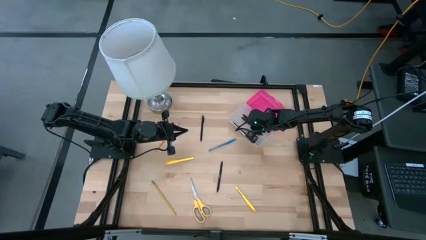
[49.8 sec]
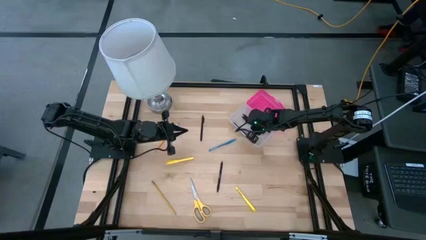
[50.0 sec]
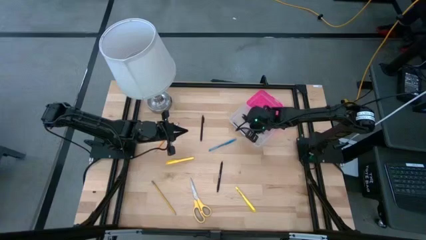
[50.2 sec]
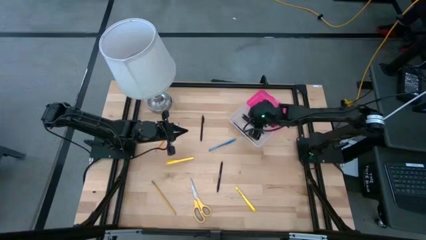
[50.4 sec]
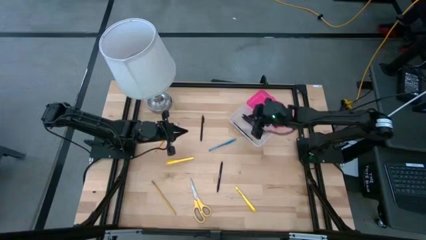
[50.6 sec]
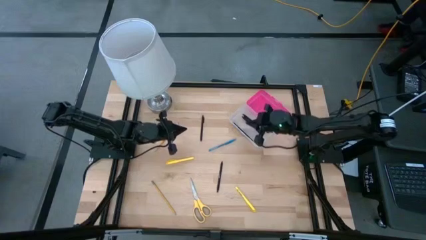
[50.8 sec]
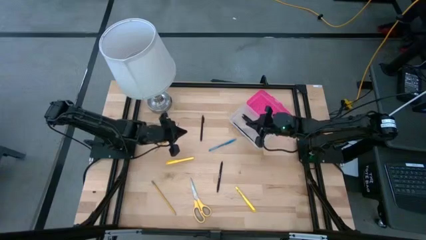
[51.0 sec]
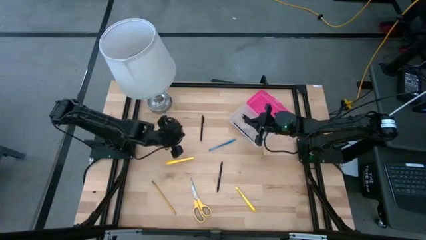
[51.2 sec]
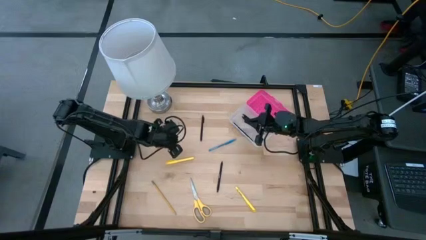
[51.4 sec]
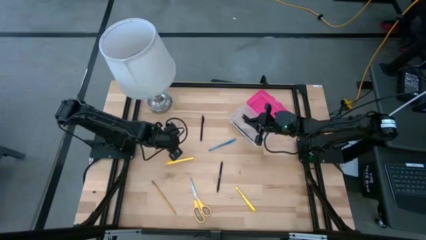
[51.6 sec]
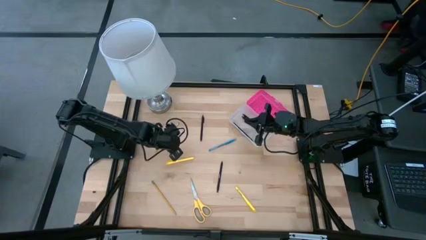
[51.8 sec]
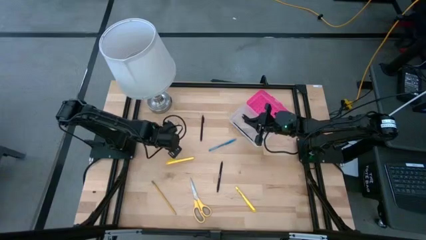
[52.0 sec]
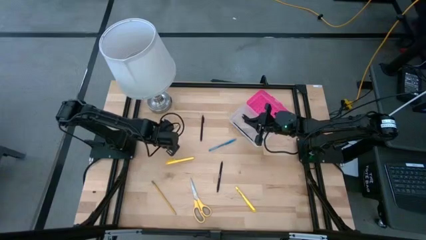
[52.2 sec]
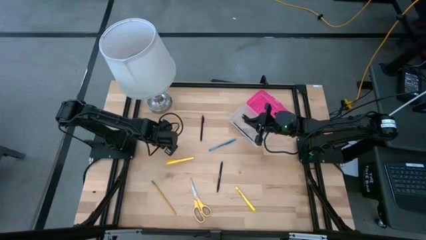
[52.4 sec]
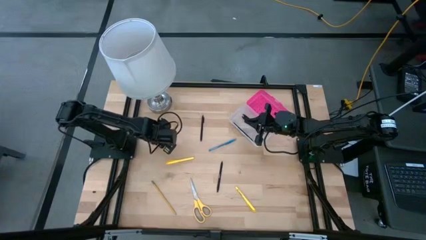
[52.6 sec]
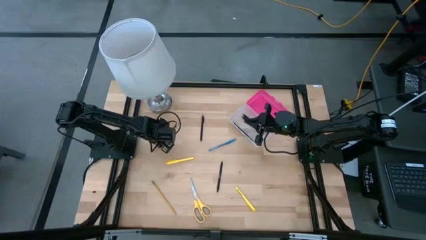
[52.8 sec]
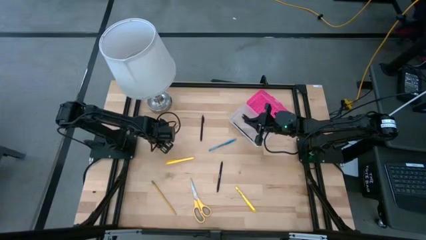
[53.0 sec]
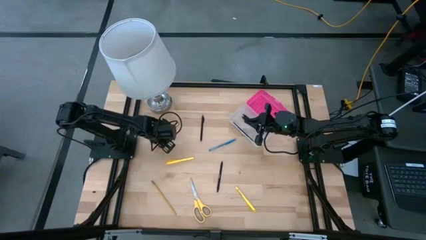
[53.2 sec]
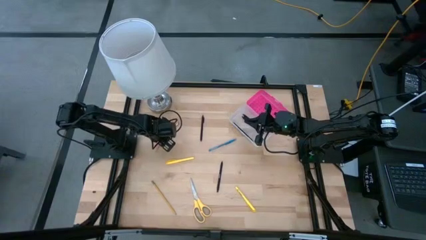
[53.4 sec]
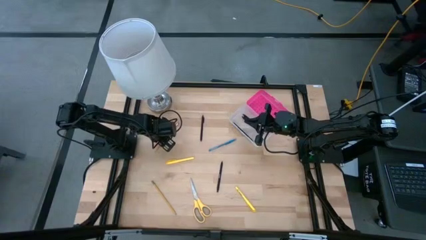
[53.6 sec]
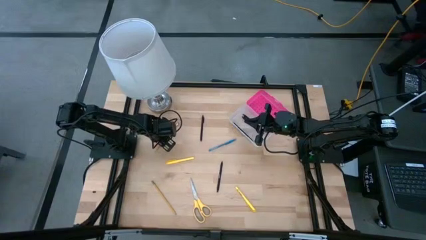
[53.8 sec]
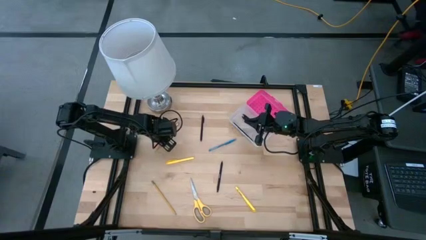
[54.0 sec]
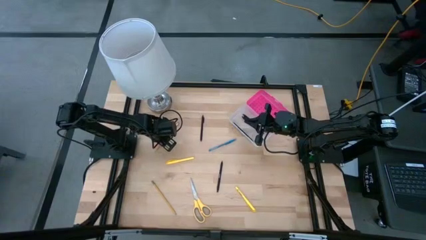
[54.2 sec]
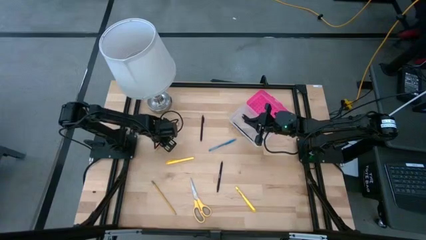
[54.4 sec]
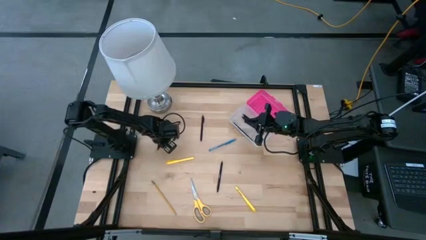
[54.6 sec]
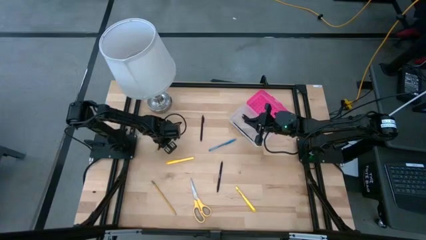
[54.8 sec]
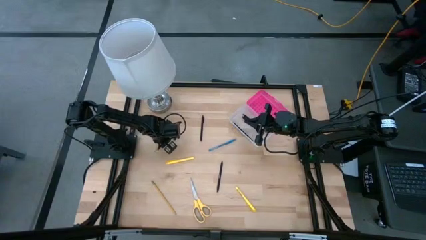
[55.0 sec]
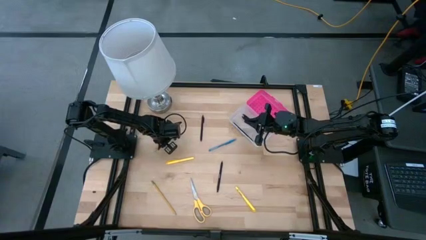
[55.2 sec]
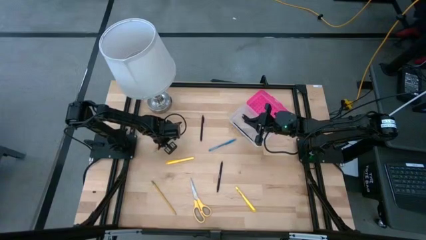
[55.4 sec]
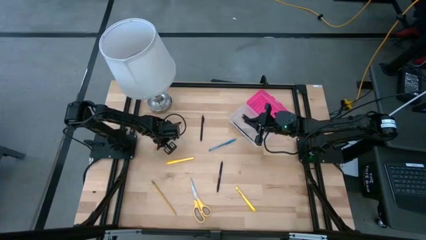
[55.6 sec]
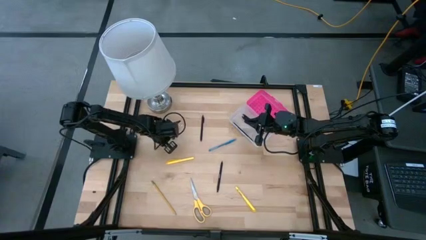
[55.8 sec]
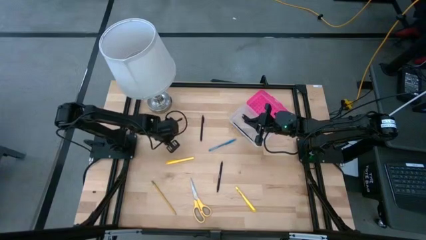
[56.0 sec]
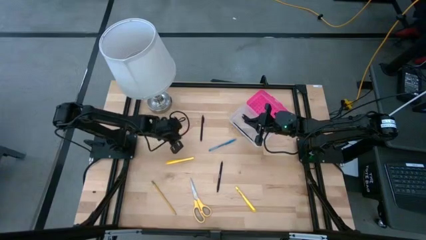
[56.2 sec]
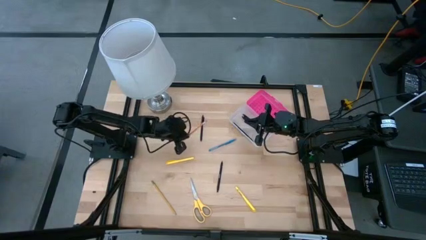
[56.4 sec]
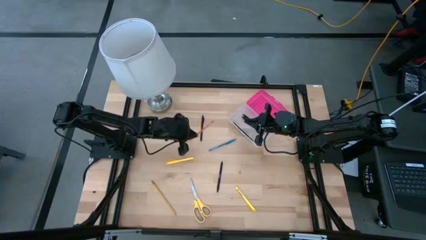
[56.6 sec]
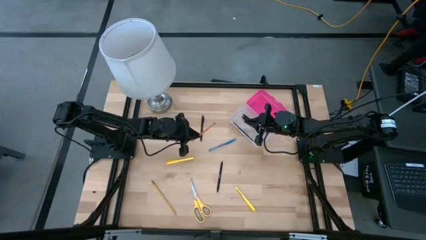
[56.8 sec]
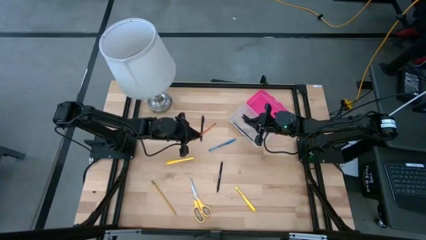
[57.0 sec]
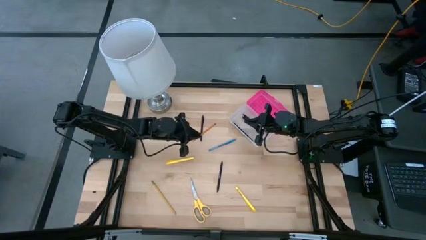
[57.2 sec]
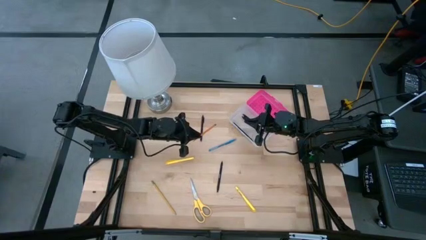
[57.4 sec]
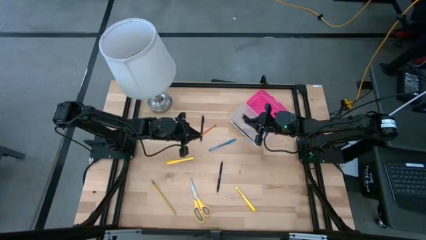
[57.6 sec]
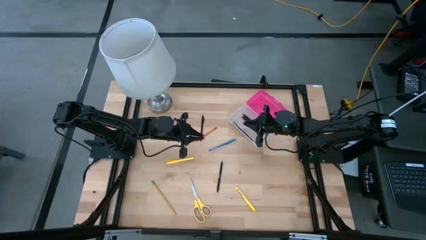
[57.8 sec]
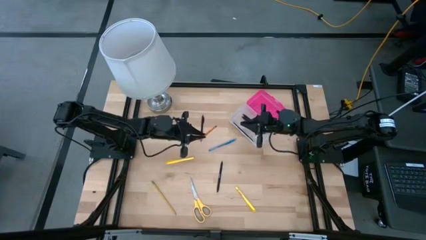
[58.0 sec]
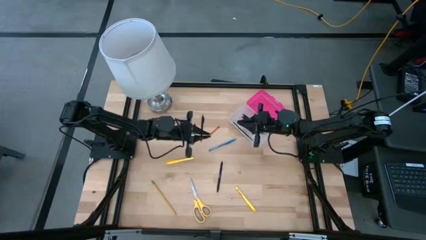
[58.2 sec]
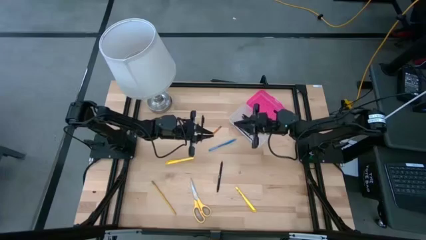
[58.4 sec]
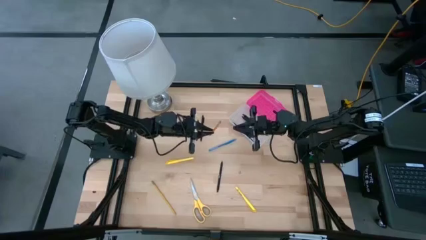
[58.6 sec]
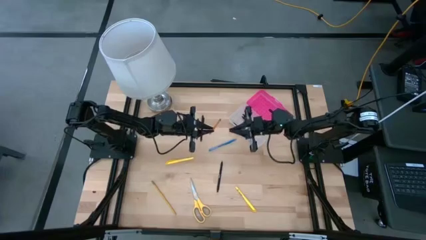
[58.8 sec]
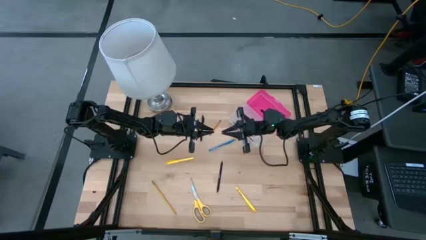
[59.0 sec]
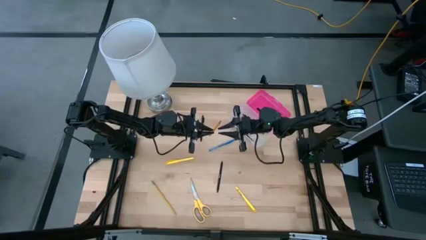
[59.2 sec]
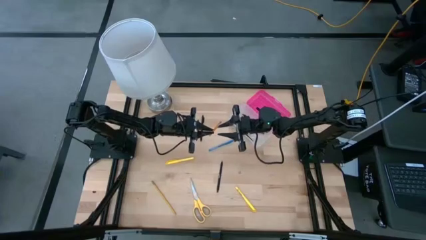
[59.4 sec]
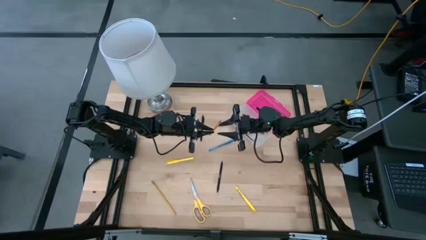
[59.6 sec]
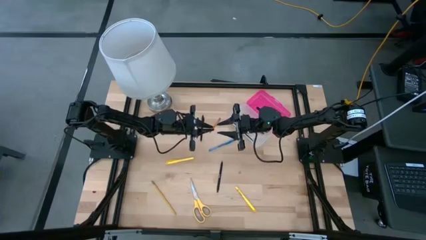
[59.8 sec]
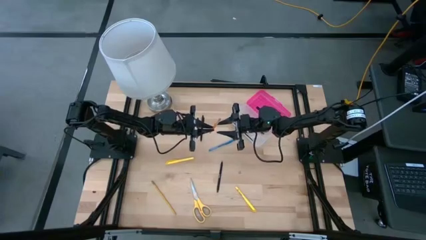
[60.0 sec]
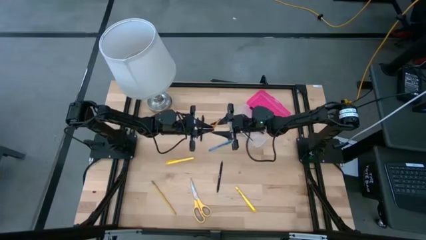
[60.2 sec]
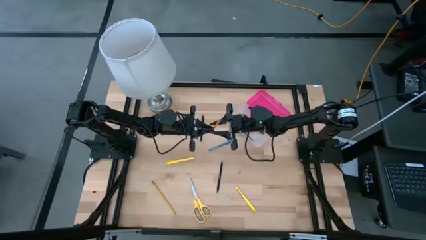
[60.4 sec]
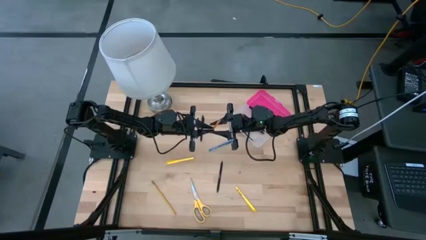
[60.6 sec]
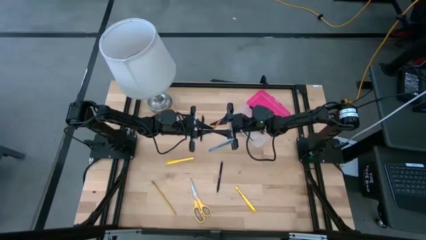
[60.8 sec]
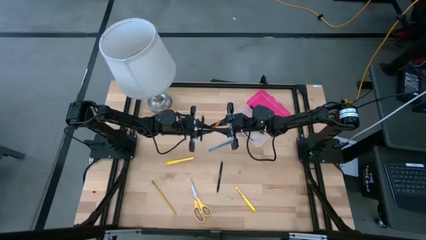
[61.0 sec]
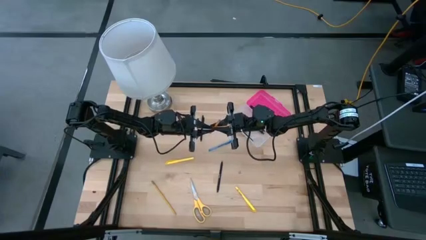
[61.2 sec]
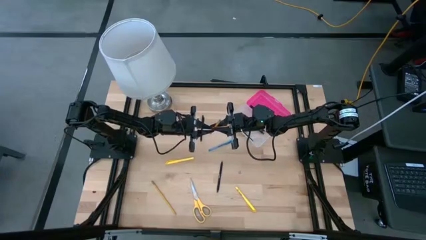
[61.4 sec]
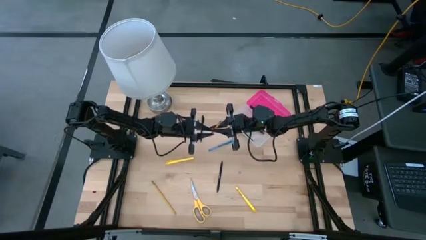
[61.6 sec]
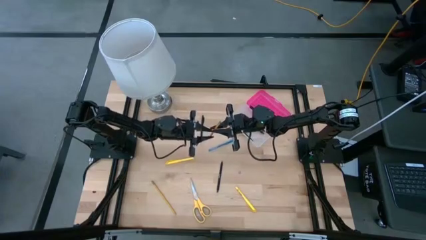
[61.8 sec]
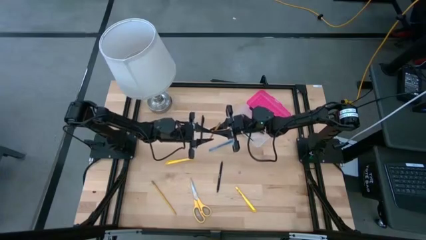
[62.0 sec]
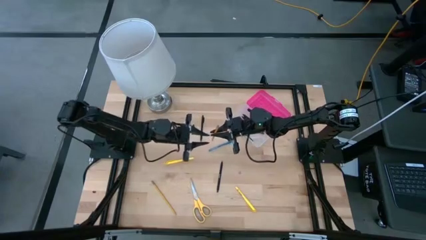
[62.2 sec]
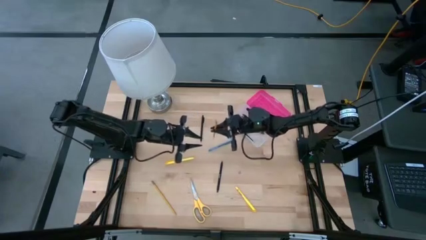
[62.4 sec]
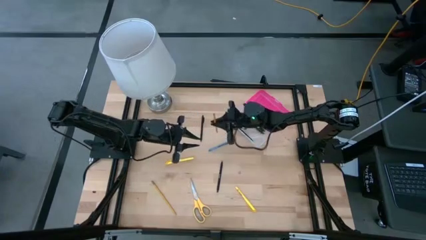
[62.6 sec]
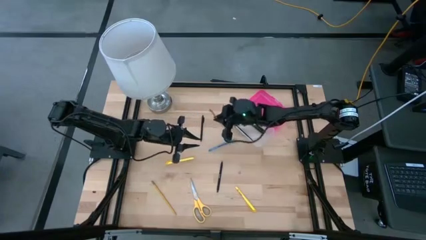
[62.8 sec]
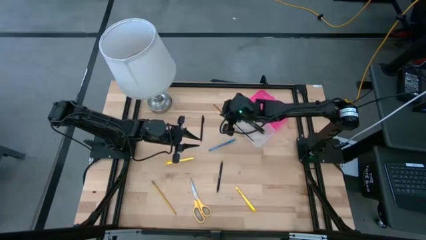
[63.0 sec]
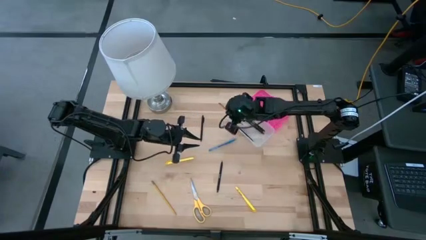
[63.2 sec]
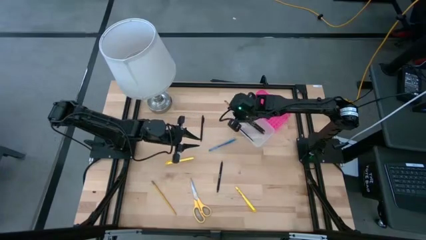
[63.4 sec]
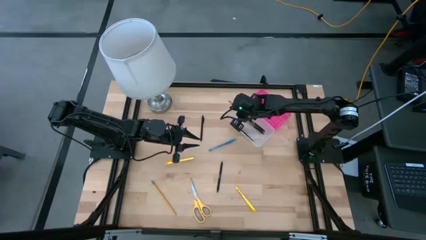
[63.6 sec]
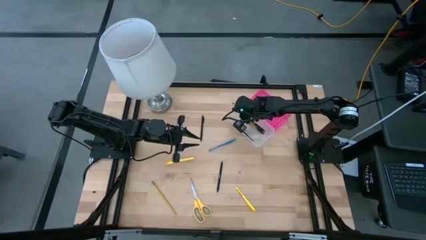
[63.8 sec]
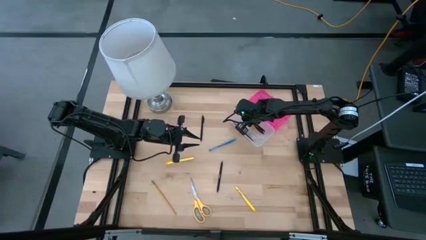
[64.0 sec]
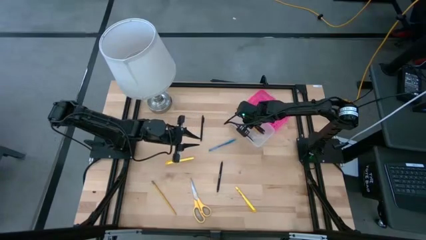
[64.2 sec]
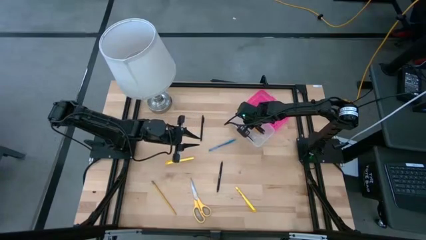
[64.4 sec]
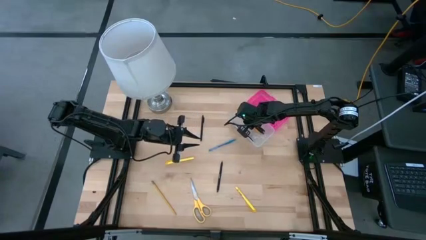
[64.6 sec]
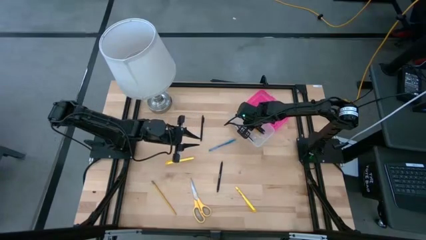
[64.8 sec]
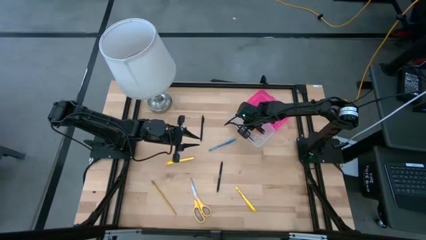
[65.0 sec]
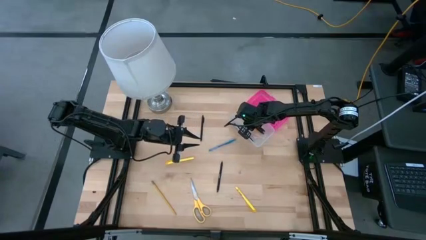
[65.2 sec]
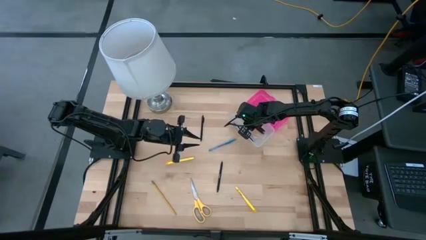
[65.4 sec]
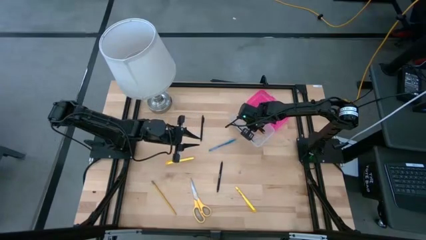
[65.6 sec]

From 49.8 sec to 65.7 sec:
Task: Pick & place school supplies into a supply box
Put the orange pencil into the pink supply box
